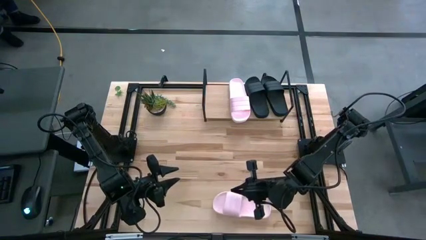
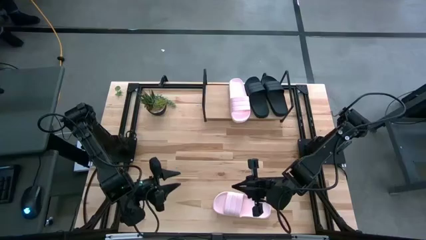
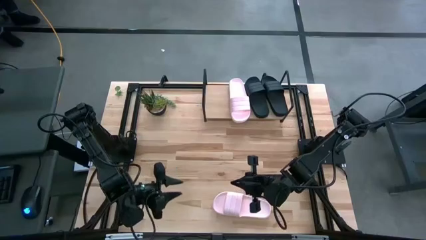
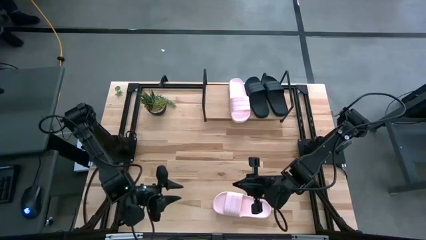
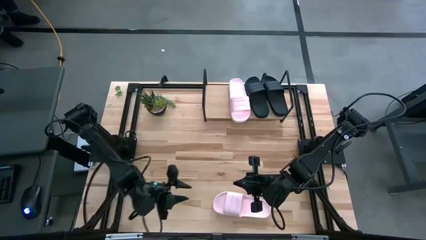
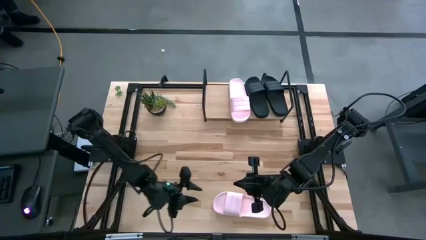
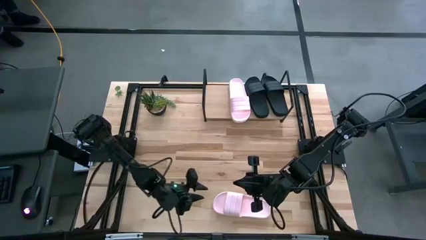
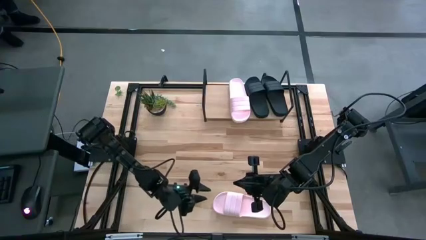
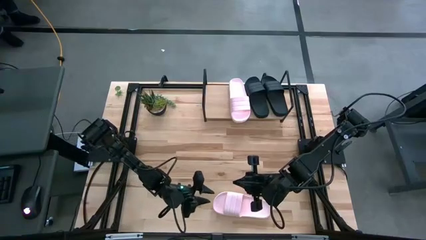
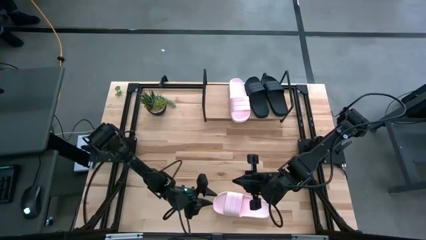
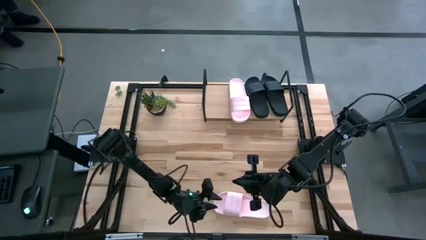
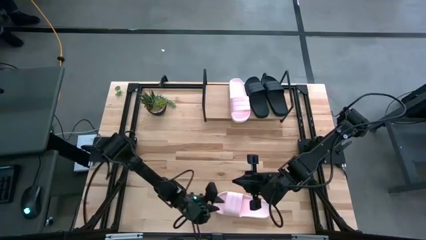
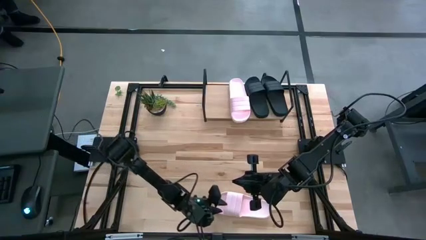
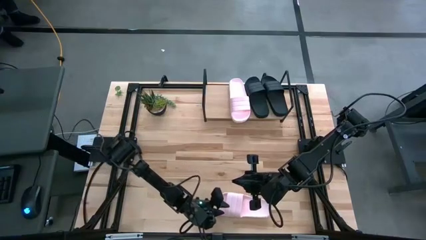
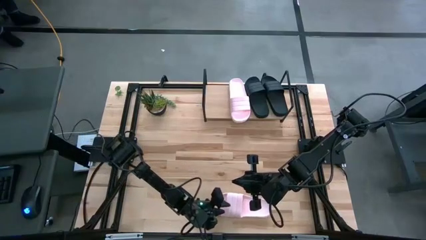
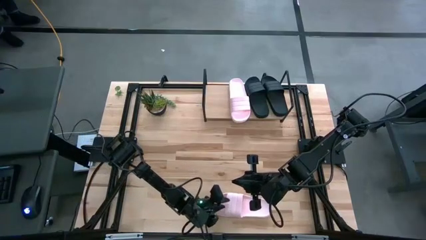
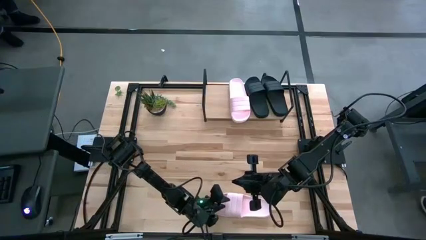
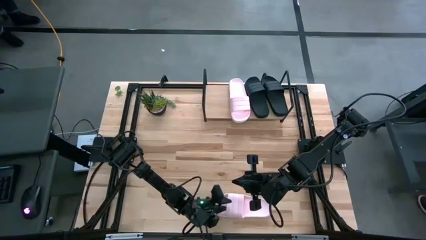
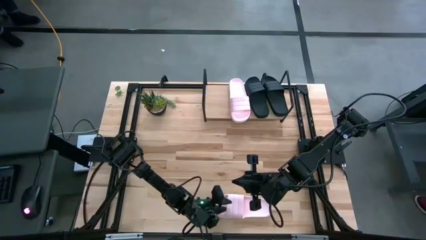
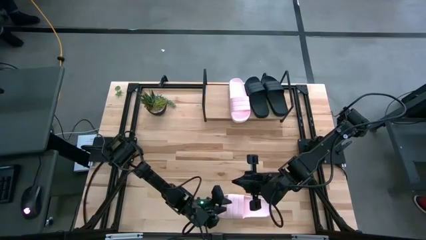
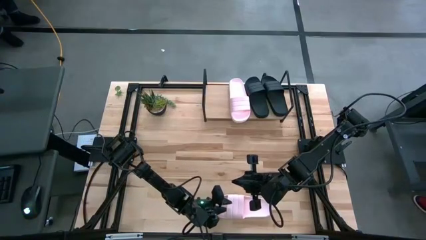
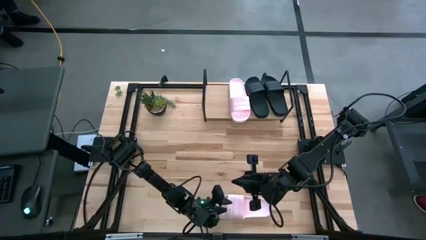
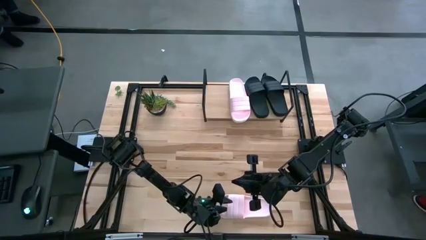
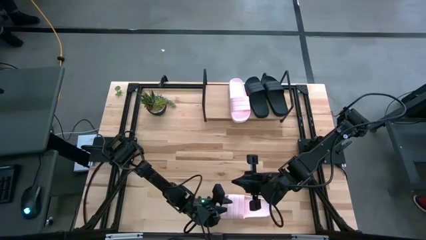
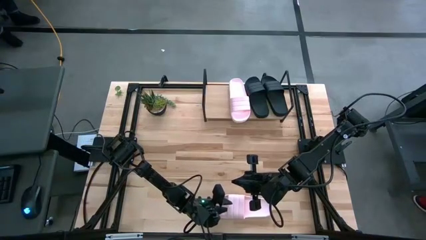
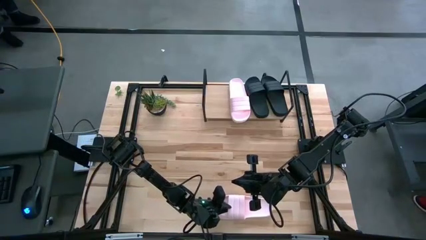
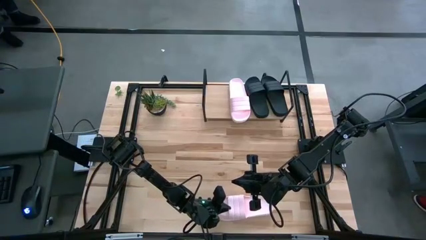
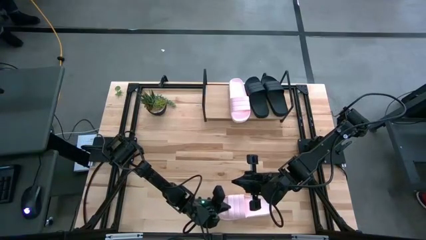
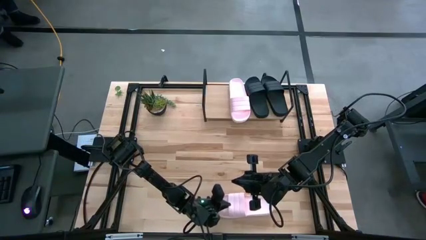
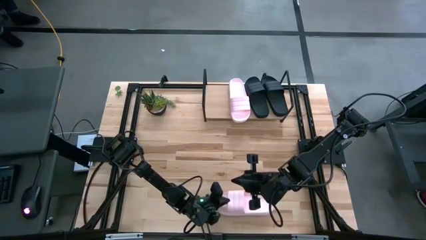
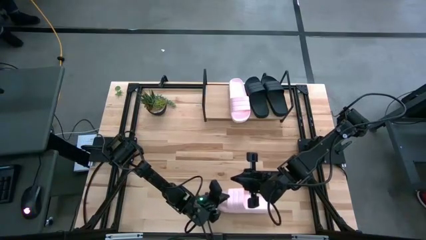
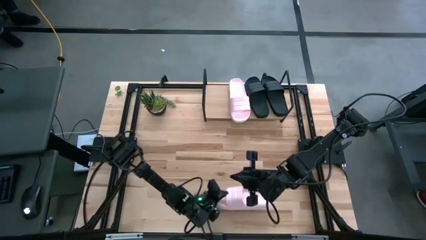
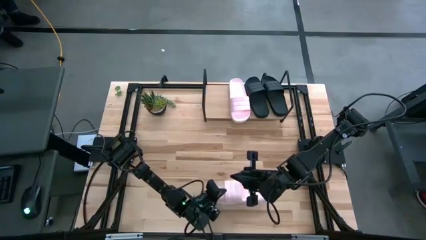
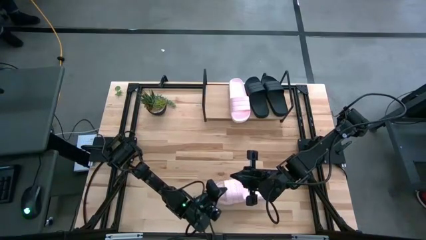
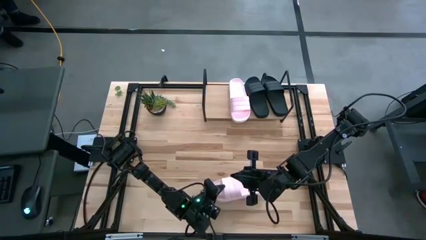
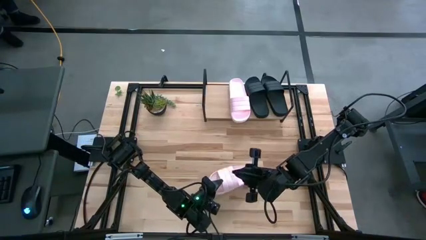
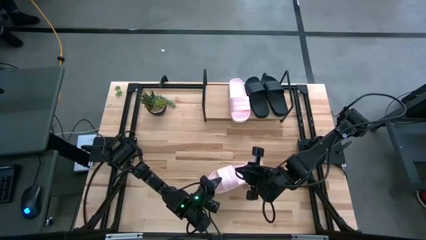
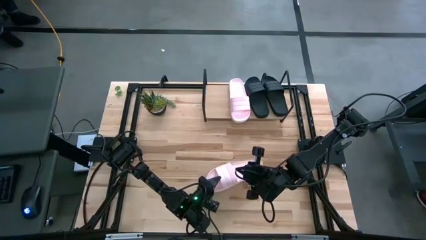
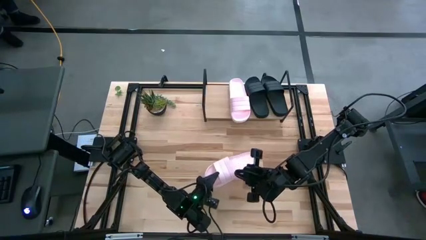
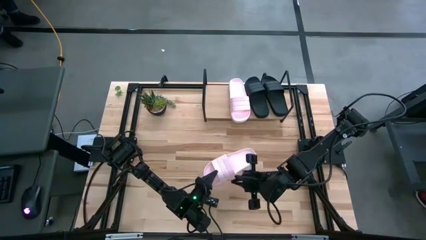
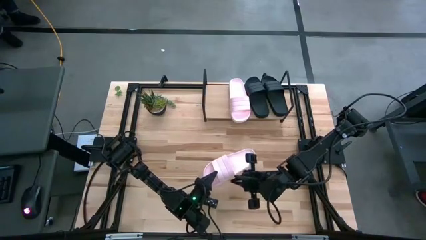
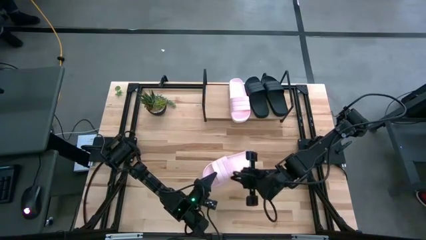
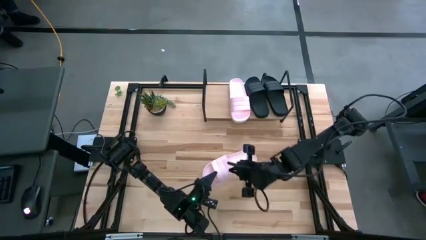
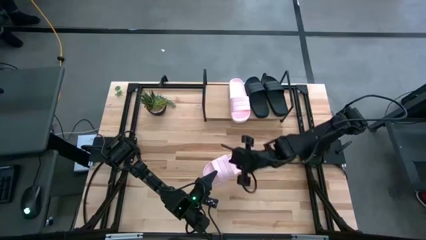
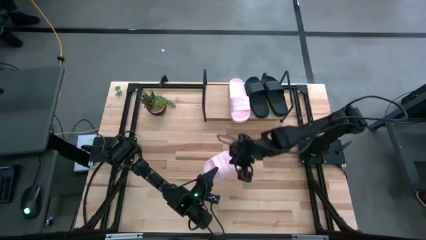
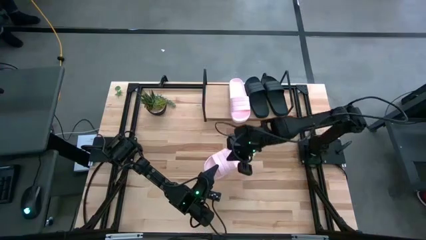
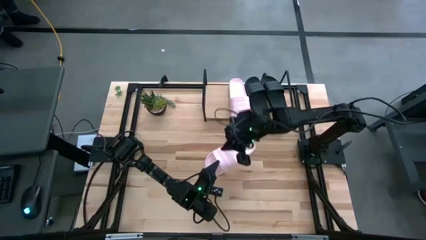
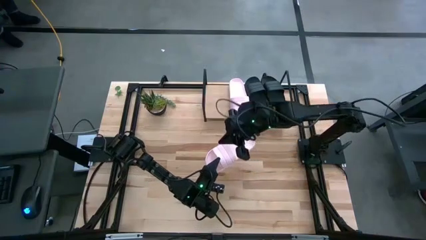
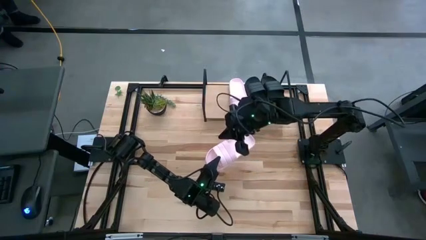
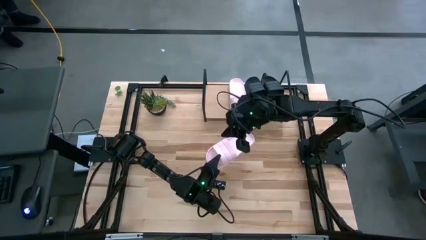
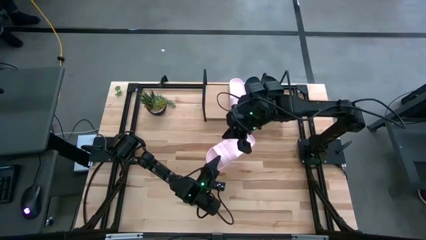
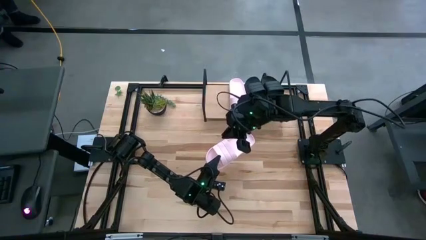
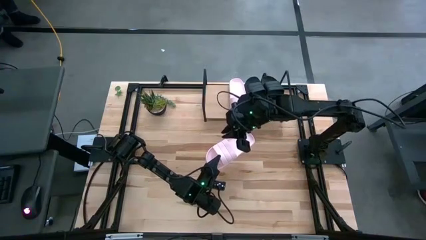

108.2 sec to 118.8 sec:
Task: Pick and place slides into the shelf
Put the pink slide on the shelf
